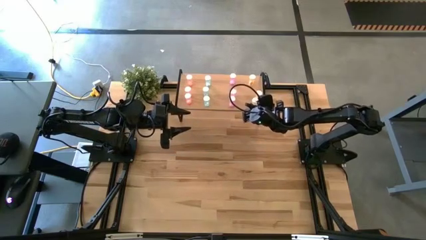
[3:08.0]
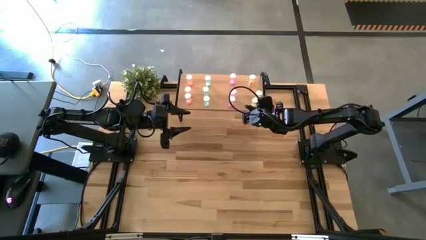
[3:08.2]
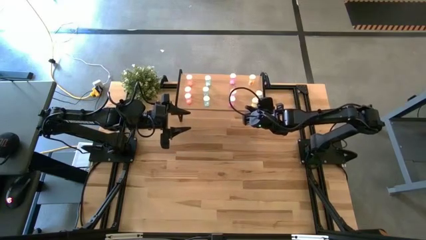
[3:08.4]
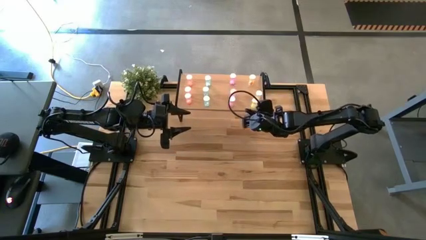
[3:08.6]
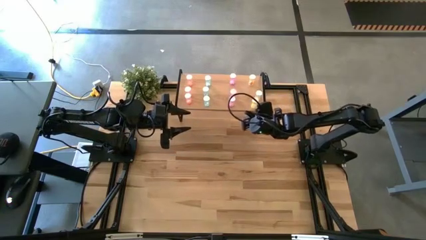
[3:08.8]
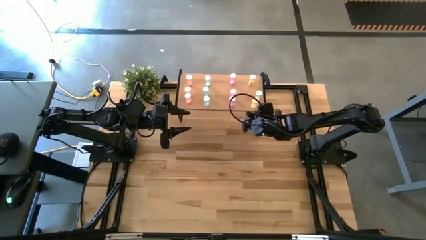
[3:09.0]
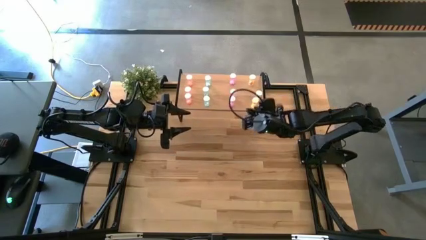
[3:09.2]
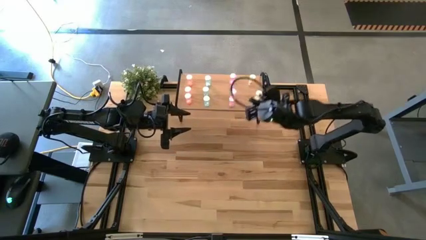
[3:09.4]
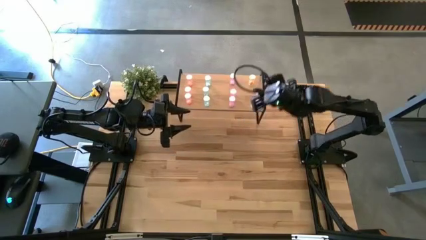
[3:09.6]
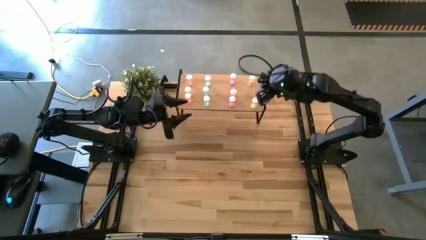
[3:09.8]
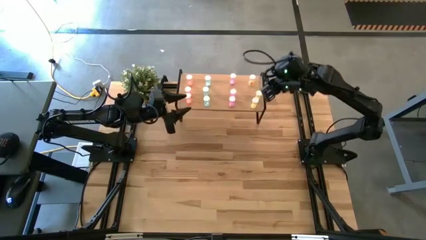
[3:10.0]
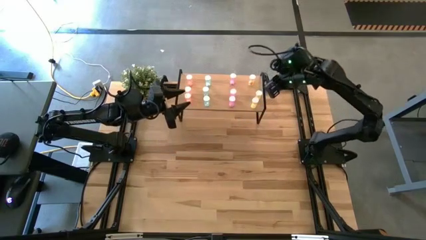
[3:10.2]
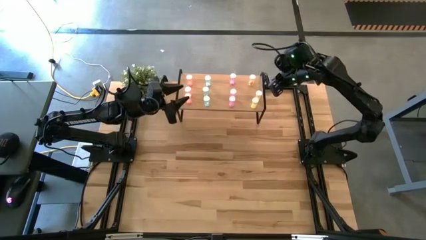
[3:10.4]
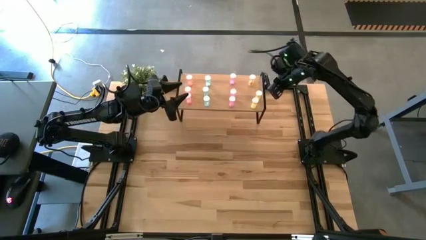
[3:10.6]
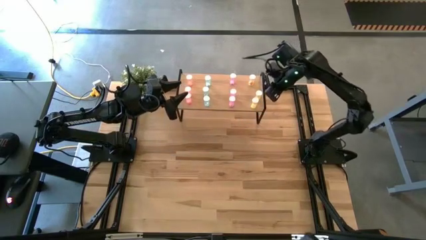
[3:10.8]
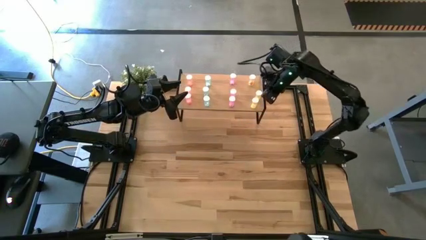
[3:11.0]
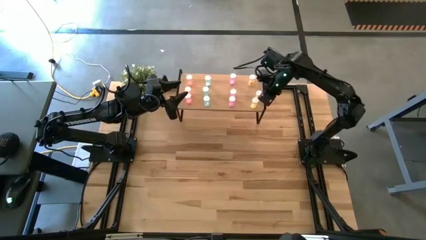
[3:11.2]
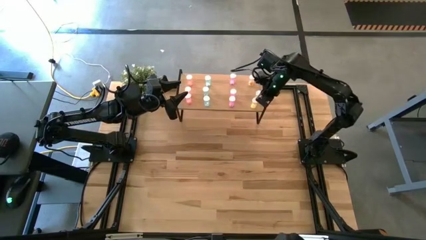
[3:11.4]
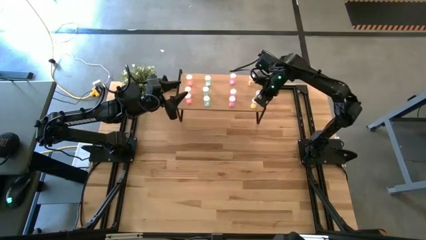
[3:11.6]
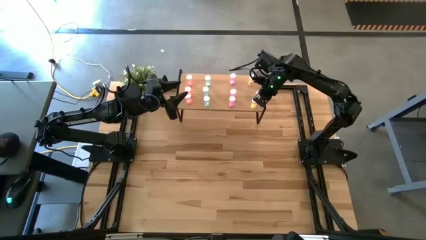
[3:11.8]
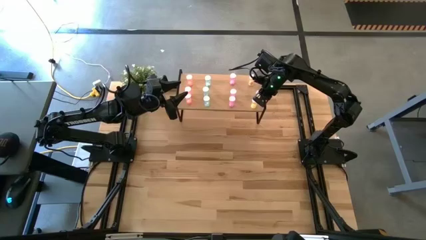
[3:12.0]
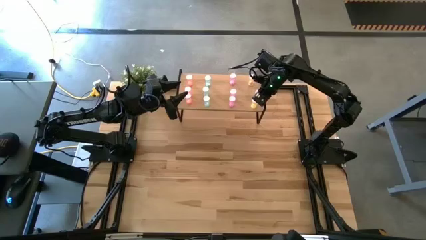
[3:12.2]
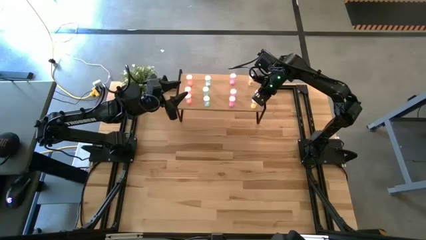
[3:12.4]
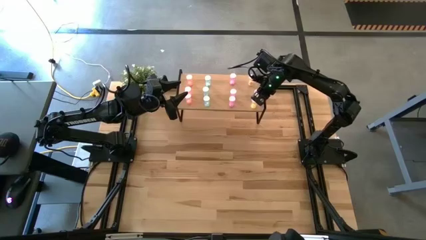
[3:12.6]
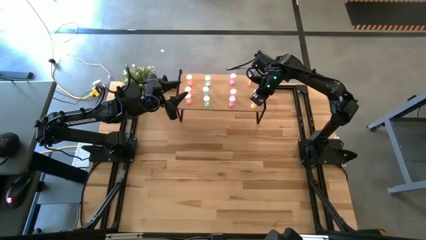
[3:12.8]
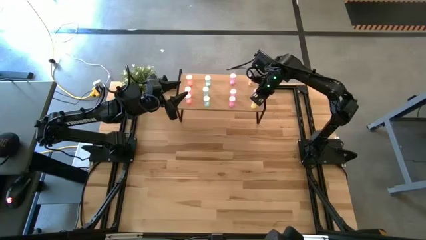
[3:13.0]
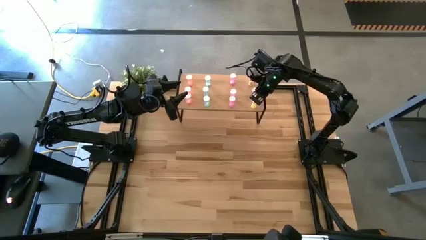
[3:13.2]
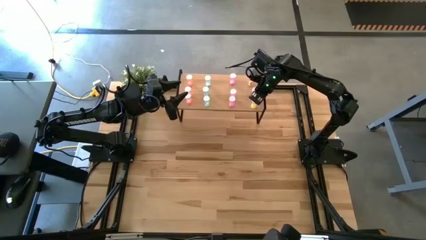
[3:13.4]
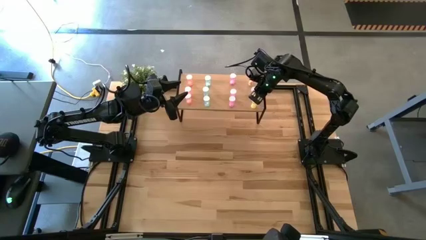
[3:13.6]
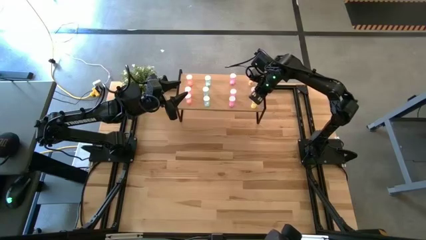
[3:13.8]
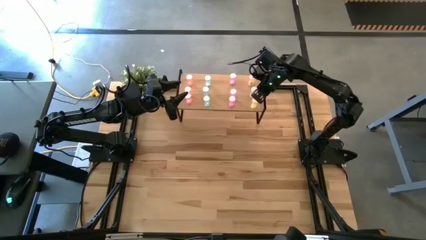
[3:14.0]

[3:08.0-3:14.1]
Task: Pick and place medicine bottles onto shelf by color
Adjust the middle yellow pill bottle on the shelf

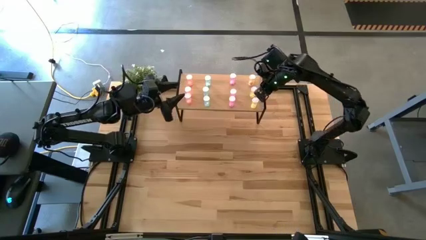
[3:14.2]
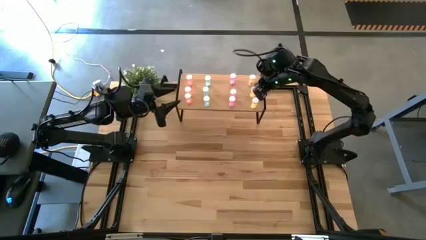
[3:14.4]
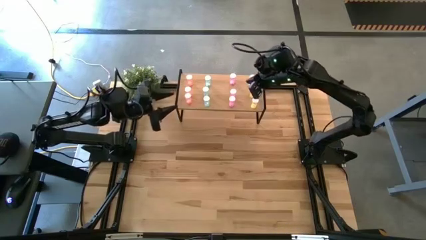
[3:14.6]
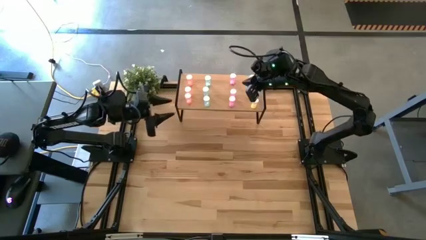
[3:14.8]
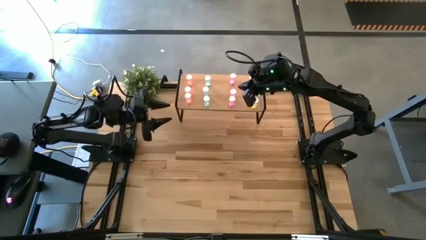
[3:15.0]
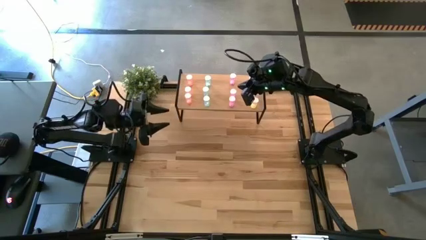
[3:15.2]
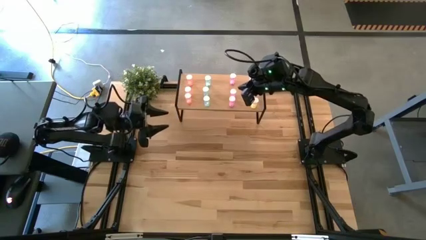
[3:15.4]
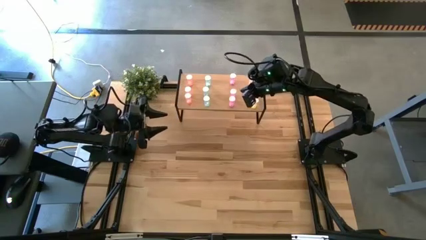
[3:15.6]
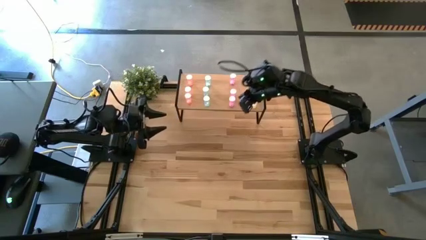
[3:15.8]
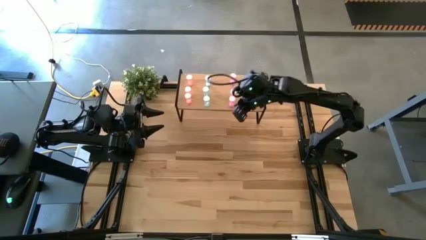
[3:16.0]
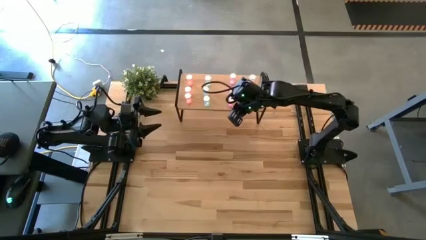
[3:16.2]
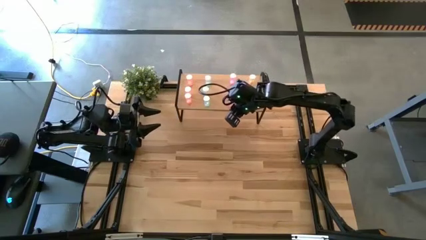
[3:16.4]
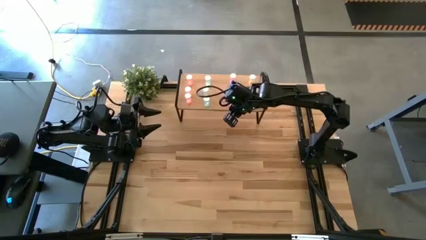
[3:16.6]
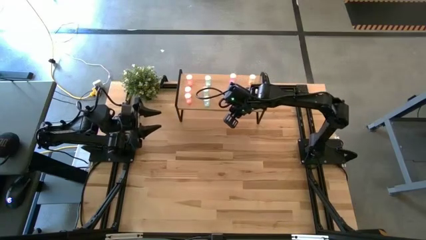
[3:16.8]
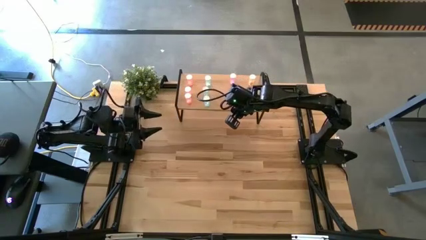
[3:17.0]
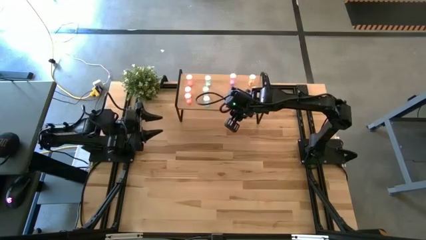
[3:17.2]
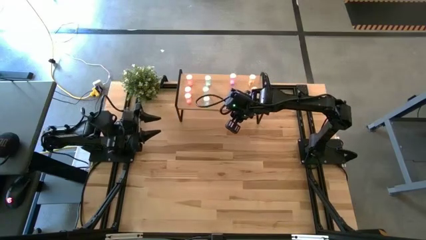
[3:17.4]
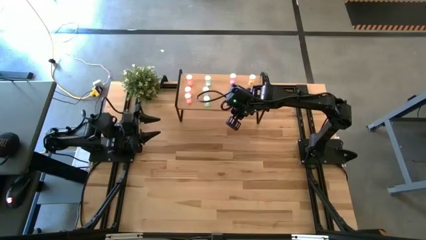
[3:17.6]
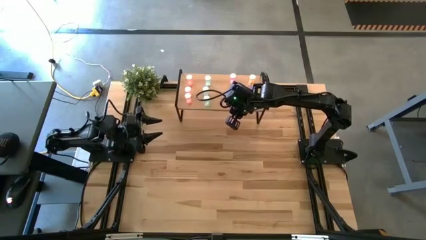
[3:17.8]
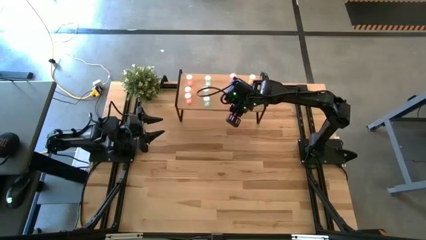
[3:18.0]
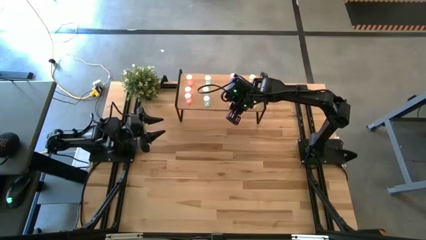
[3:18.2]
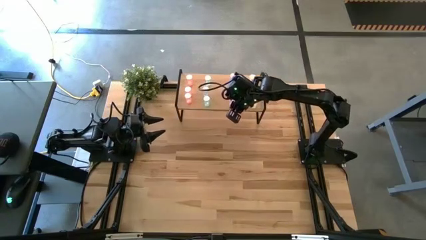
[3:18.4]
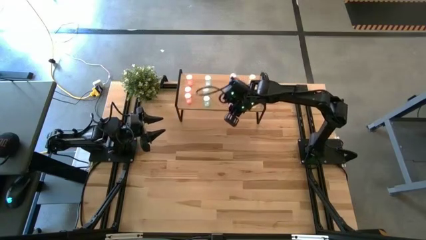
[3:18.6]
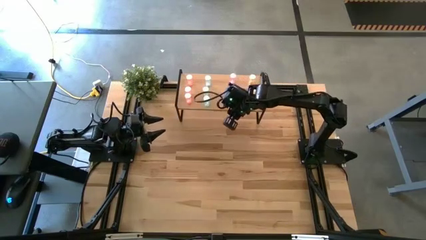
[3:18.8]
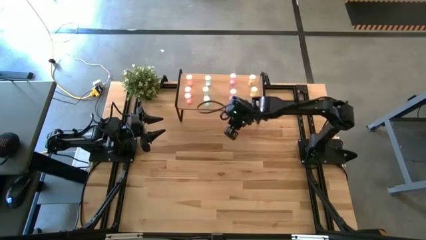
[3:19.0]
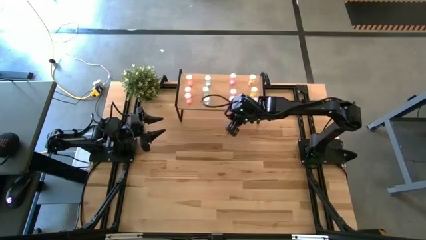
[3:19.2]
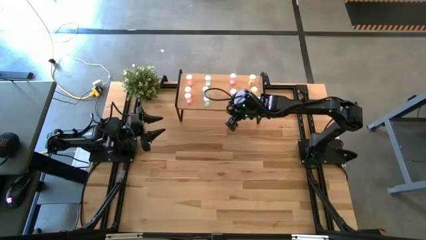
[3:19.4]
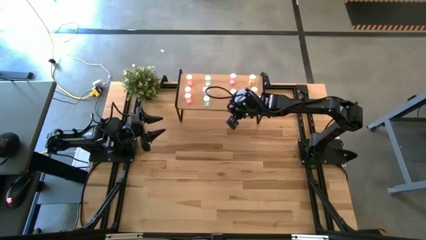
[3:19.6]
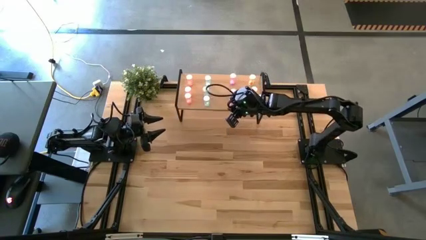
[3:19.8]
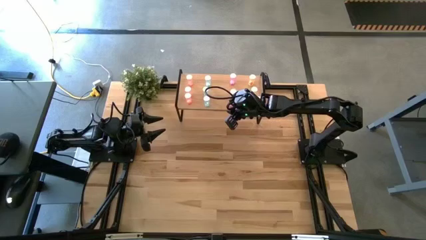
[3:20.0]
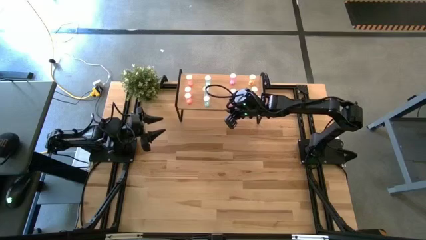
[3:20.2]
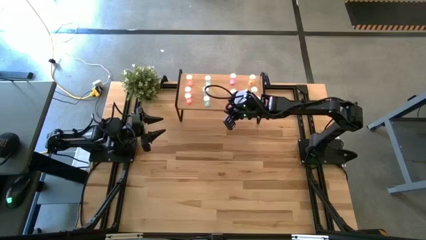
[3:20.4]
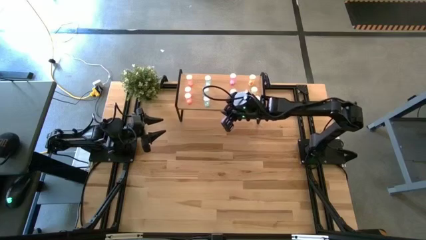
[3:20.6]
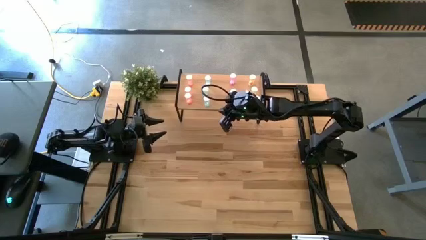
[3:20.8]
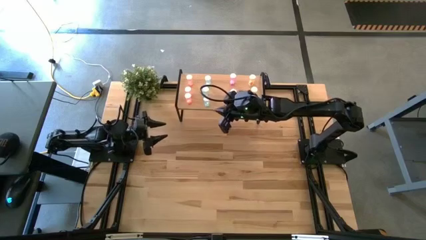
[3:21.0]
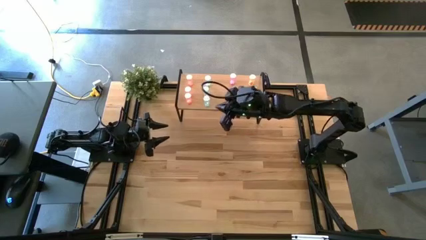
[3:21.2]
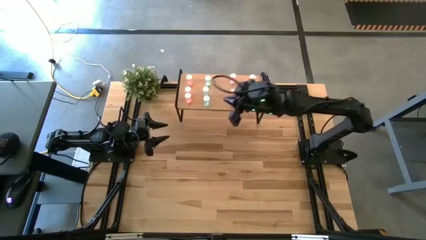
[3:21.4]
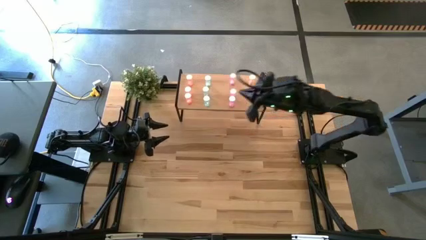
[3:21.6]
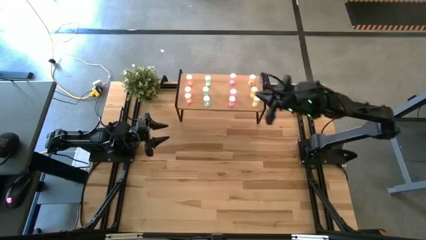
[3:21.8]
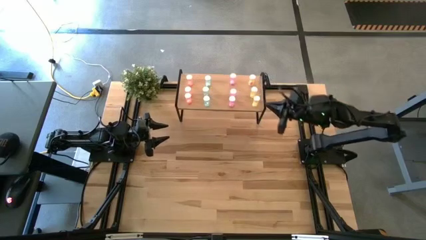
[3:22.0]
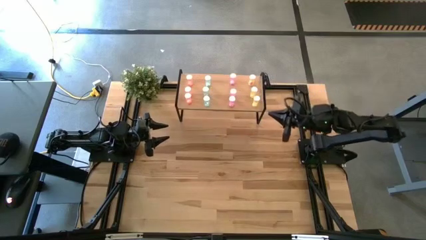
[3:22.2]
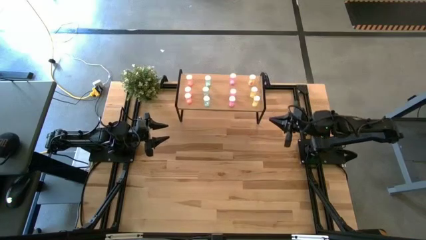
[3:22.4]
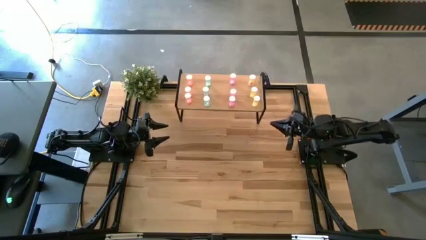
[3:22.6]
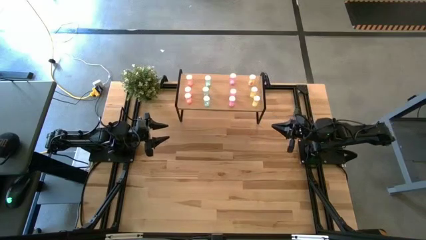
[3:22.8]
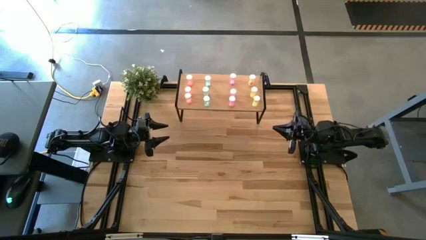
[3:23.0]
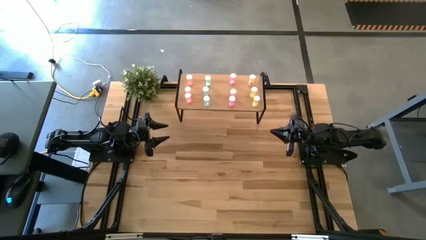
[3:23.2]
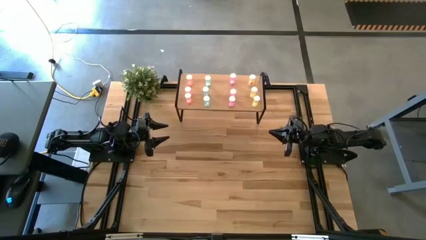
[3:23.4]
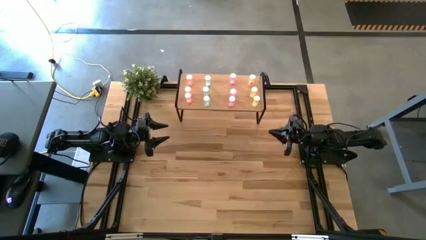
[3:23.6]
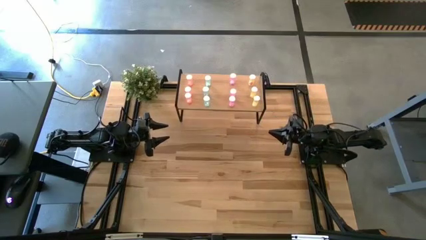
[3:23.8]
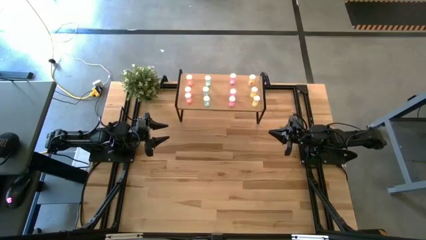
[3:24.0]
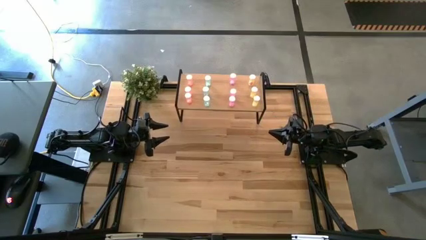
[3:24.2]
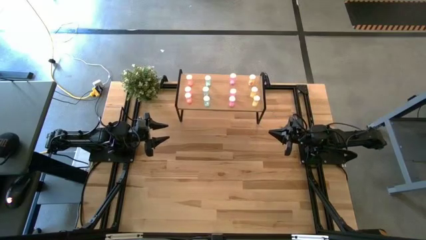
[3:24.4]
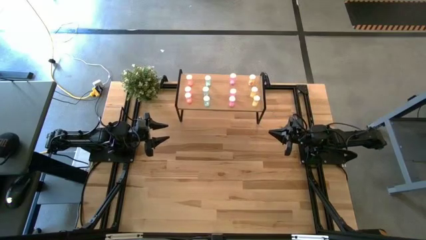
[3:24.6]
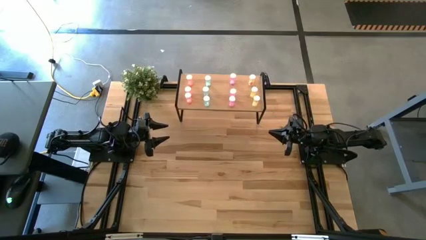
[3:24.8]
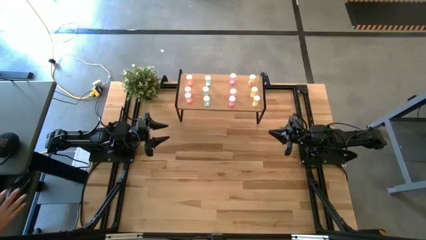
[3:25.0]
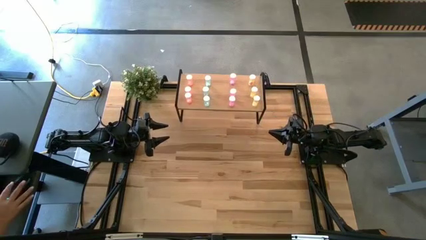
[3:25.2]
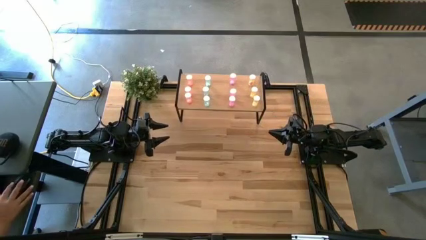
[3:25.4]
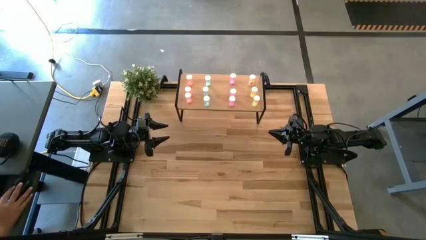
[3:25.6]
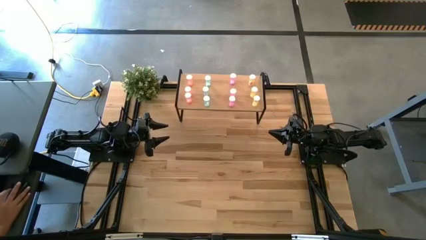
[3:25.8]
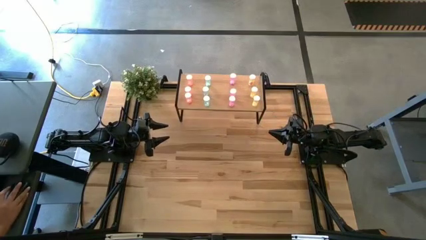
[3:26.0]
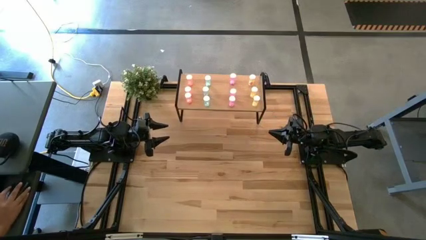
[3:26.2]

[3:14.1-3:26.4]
Return to Home Position
